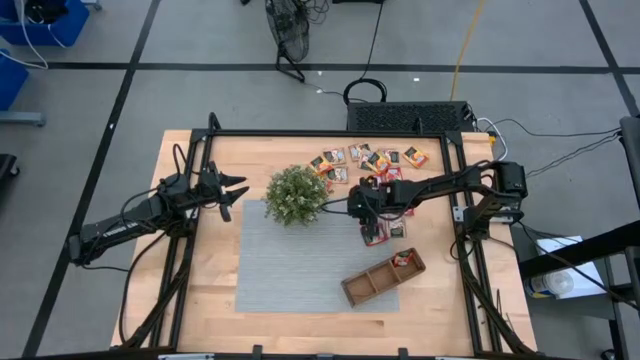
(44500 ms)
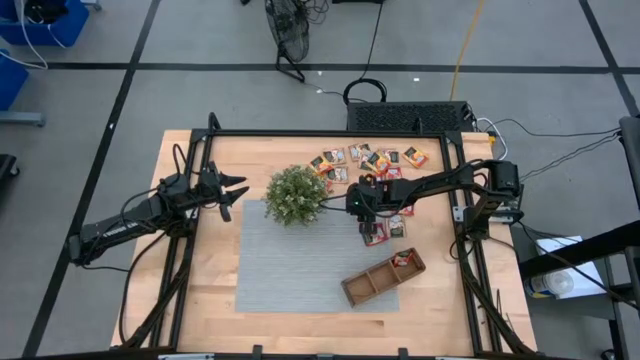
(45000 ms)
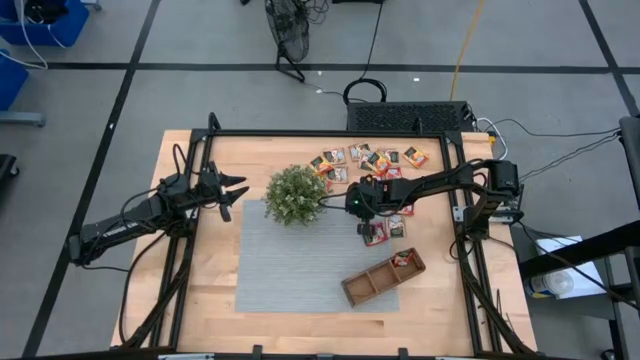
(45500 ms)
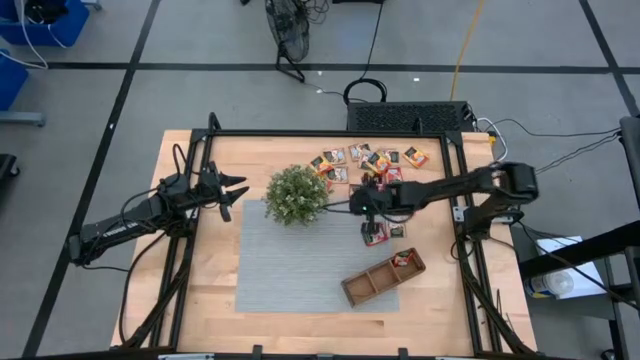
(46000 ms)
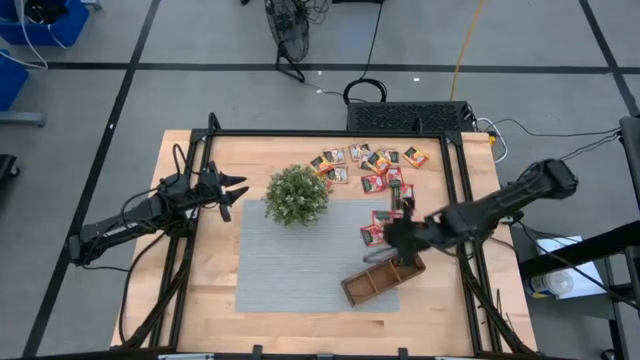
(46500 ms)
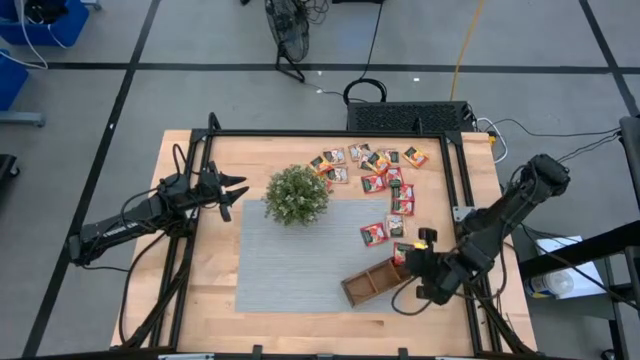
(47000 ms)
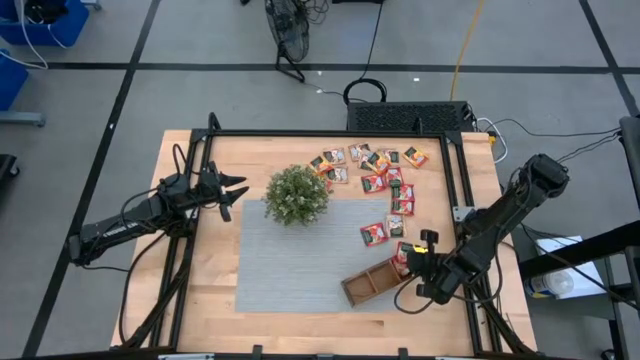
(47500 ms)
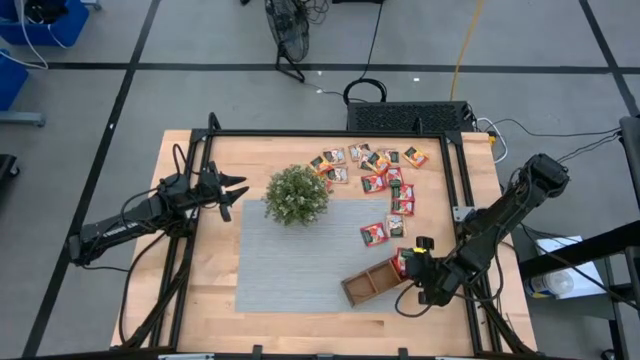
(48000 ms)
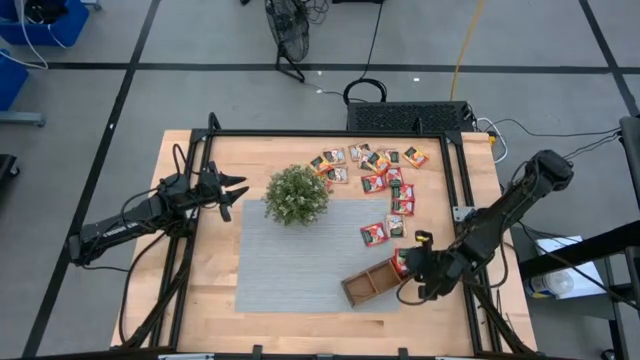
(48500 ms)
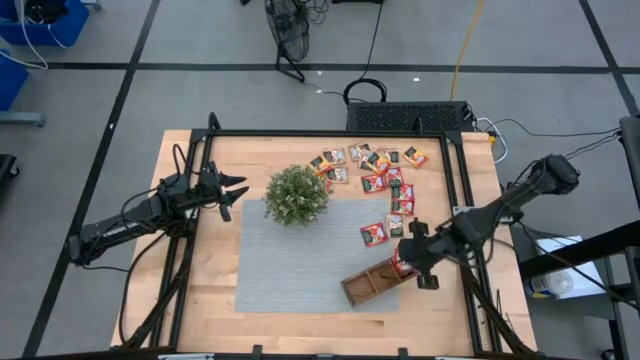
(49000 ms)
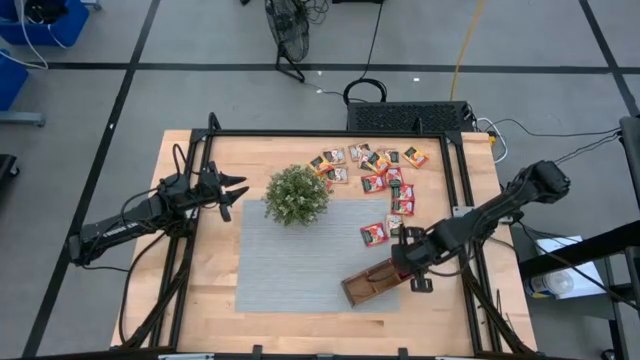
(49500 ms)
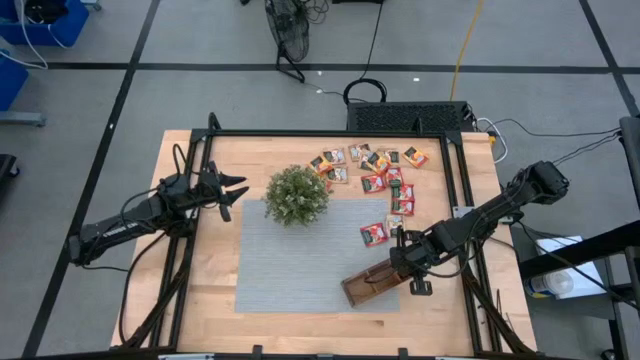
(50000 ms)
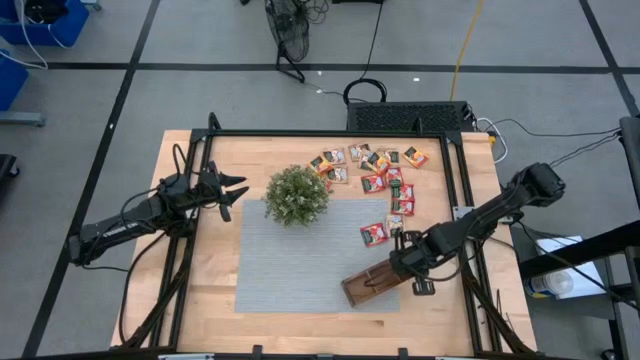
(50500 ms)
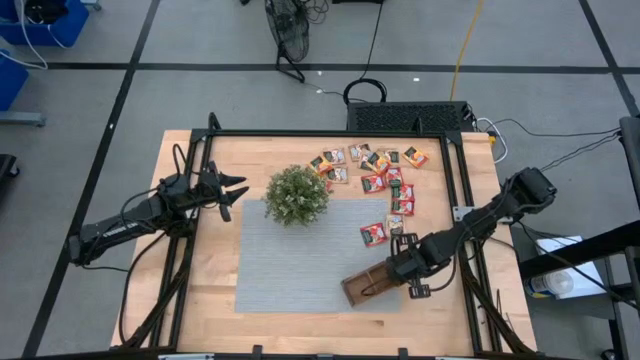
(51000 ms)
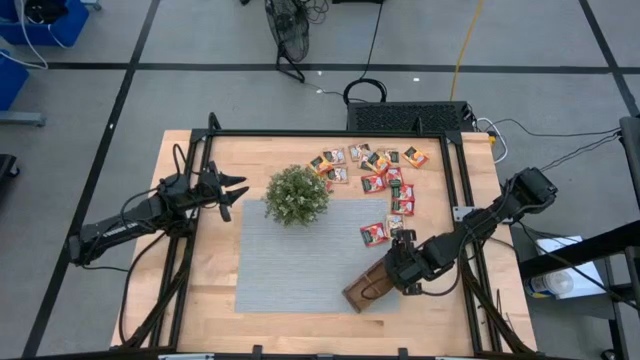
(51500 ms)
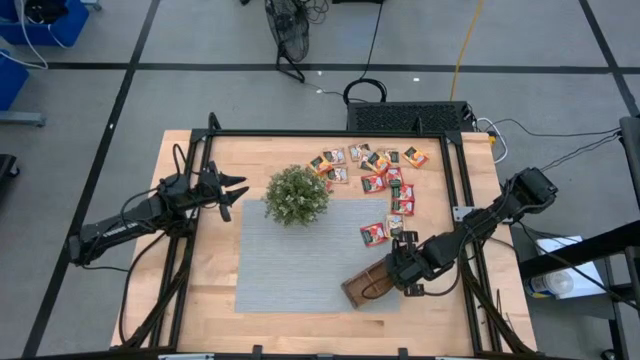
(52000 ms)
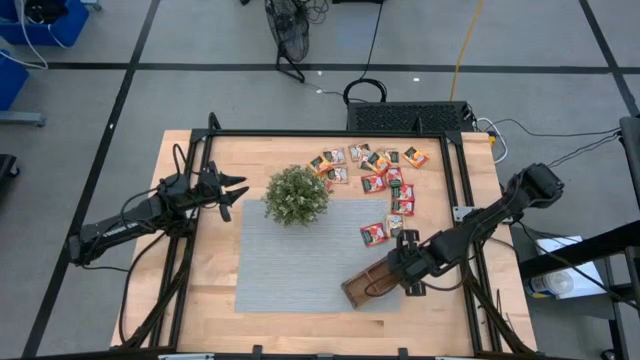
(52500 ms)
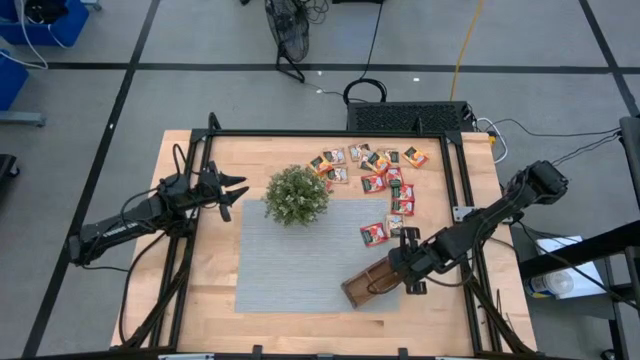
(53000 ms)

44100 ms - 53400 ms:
Task: Pick & Place Tea
Put the strawberry tea sachet into the brown organizer

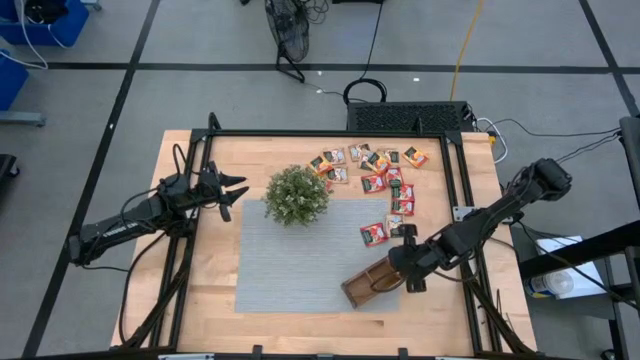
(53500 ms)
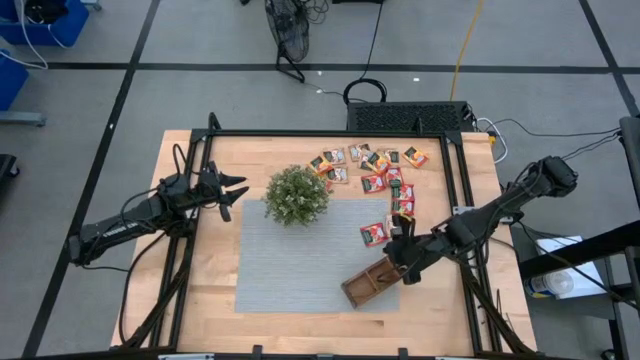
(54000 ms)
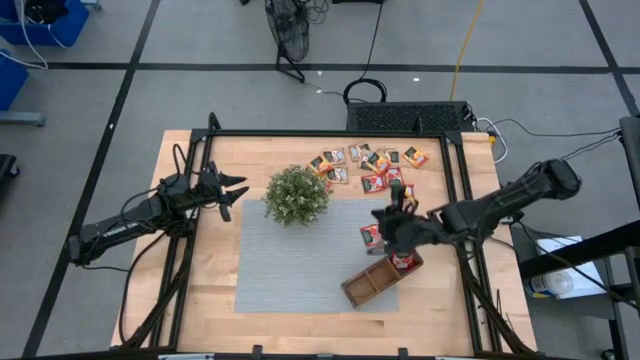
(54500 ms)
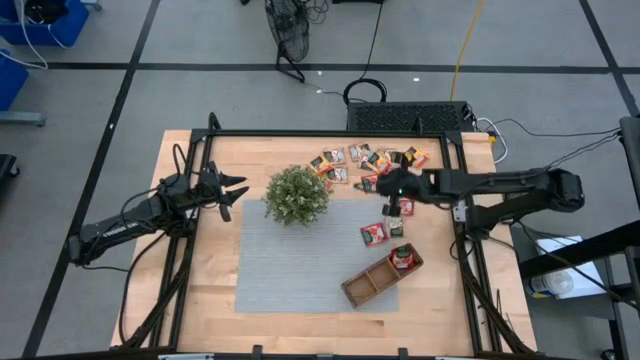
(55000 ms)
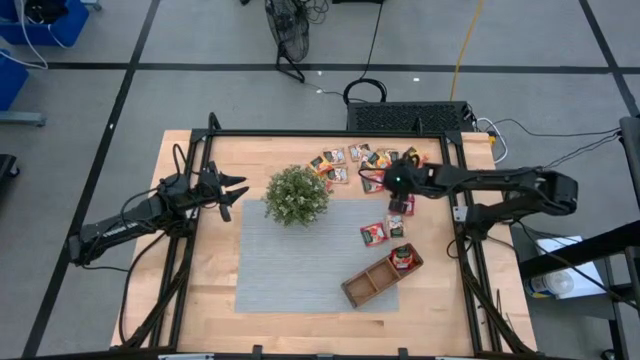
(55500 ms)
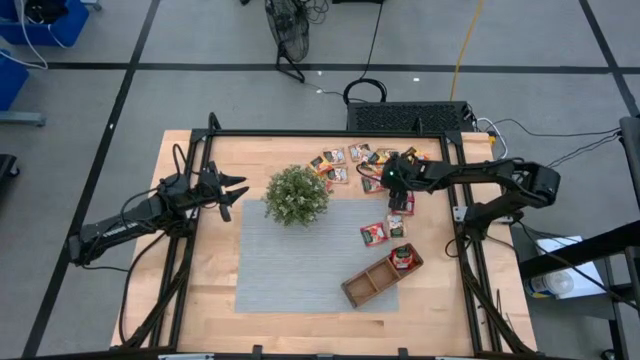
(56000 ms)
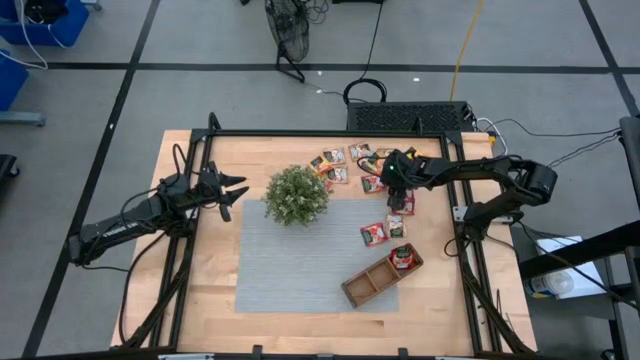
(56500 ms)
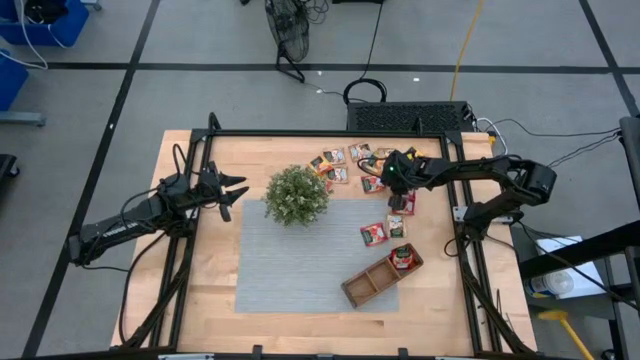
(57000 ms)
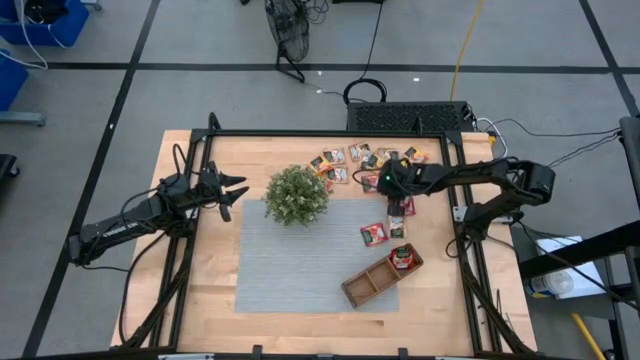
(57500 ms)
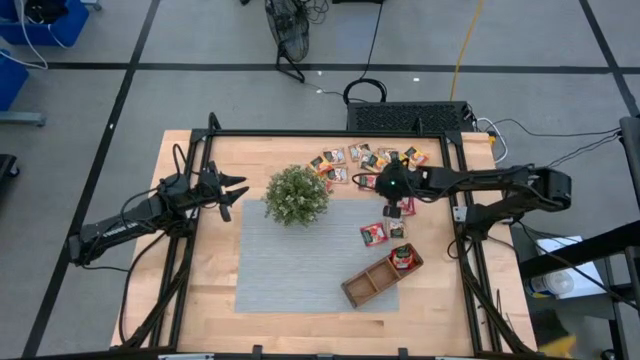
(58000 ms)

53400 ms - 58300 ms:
Put the strawberry tea sachet into the brown organizer
